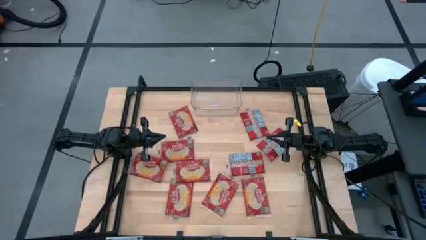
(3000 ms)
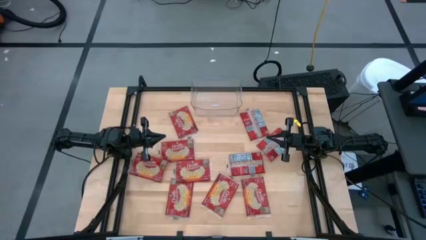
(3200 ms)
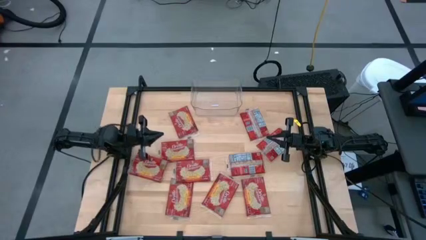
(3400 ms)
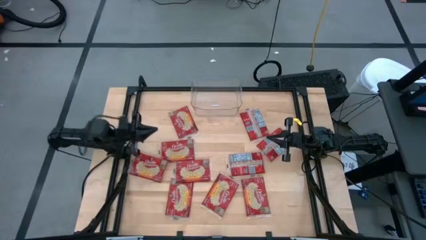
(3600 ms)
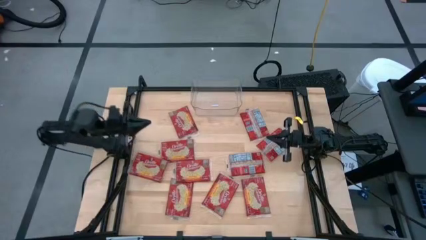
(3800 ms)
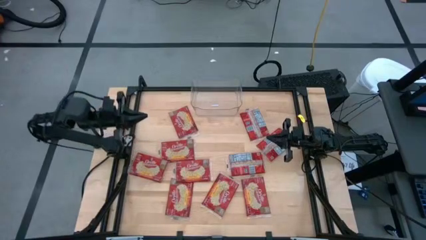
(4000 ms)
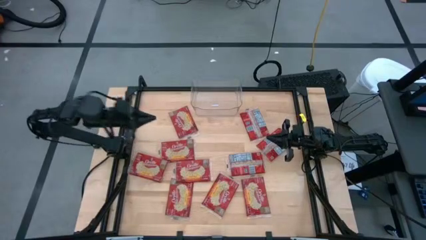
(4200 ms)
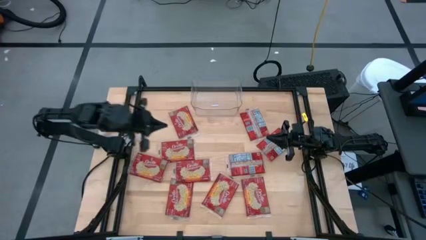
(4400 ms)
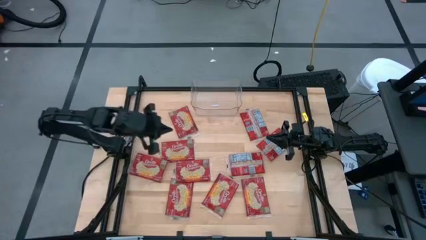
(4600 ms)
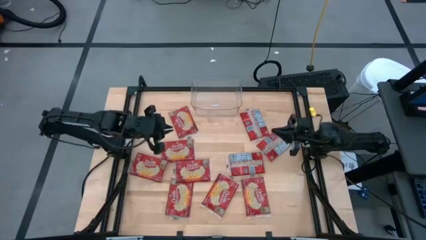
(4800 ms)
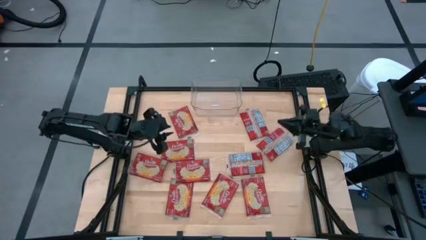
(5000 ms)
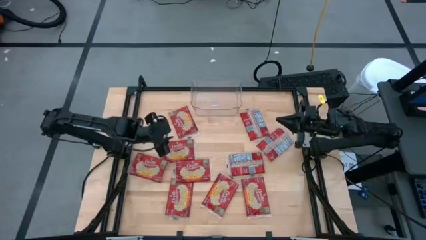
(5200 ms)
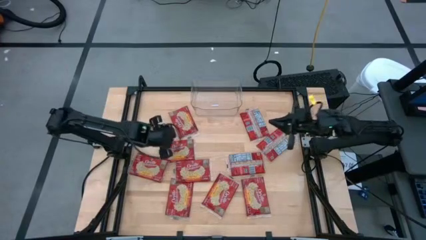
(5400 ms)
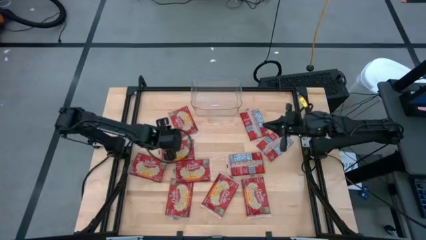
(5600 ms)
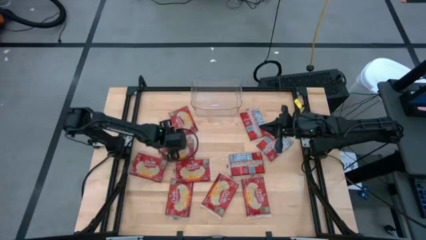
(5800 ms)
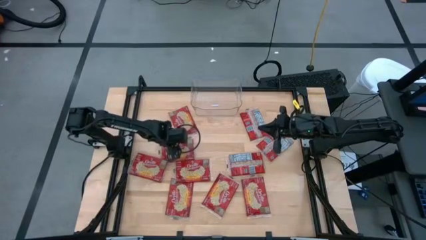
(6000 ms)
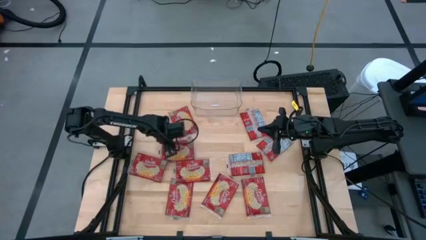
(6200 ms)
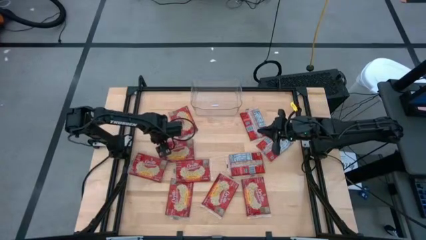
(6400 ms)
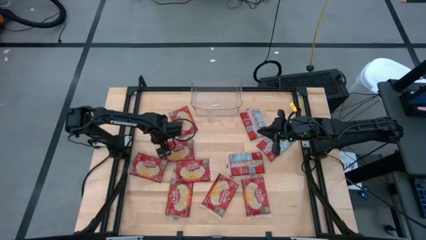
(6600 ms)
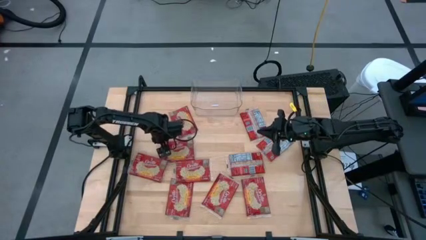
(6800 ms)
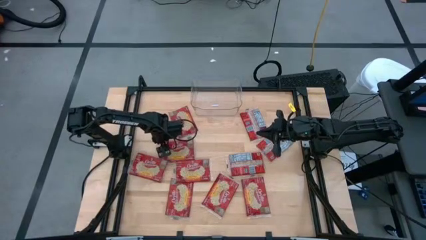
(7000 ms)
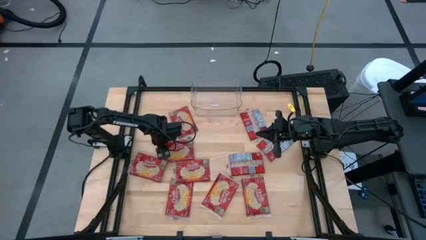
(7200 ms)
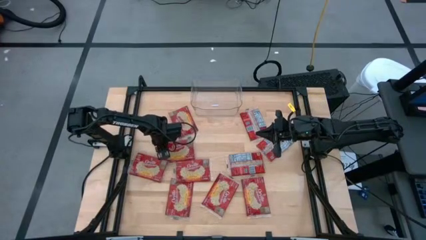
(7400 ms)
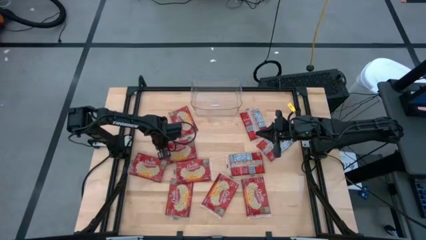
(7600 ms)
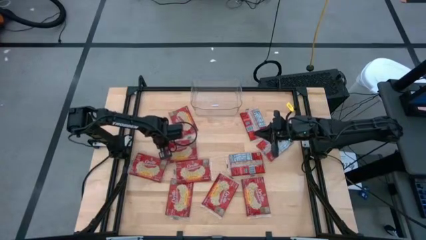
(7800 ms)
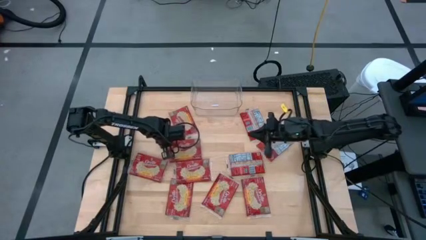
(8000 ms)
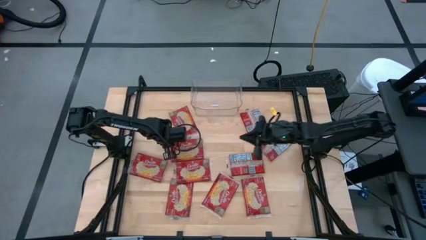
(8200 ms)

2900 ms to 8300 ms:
Task: Sort popcorn bags into baskets
Put the red popcorn bag into the transparent bin

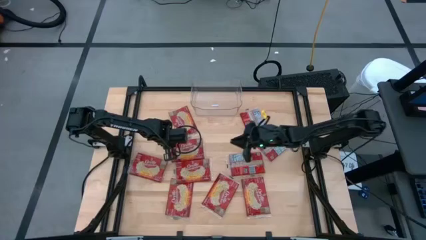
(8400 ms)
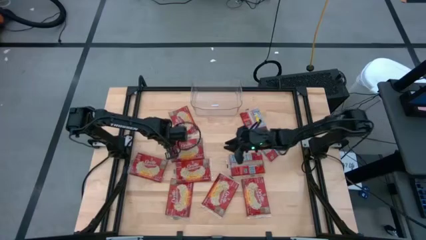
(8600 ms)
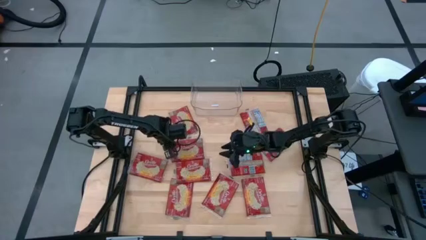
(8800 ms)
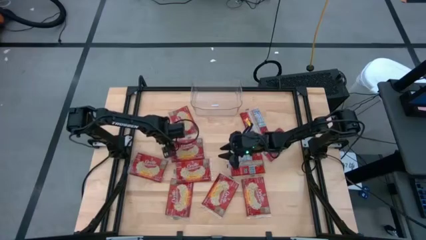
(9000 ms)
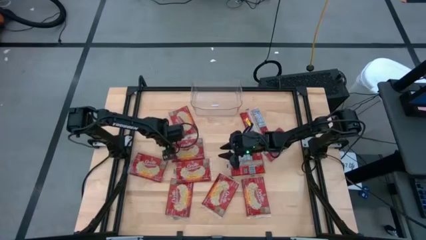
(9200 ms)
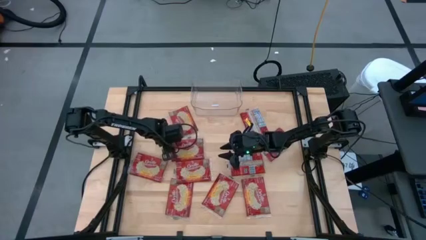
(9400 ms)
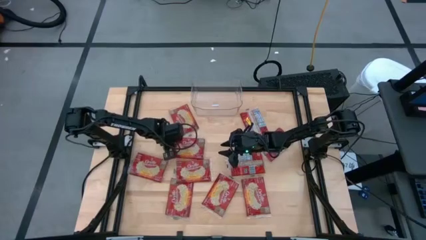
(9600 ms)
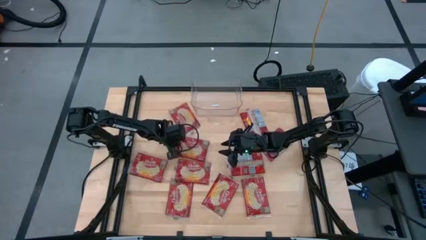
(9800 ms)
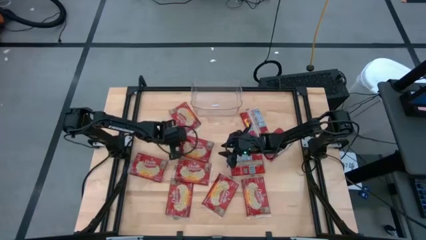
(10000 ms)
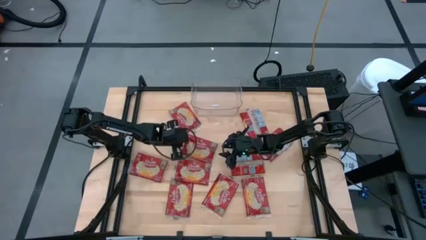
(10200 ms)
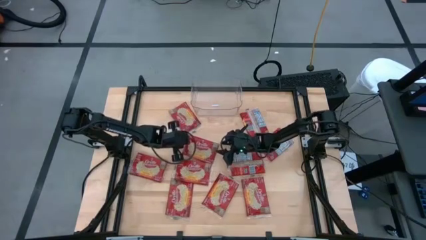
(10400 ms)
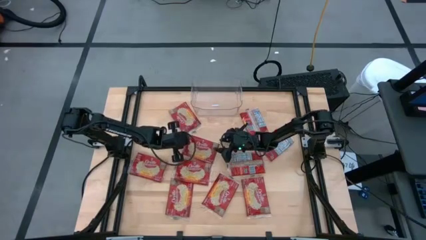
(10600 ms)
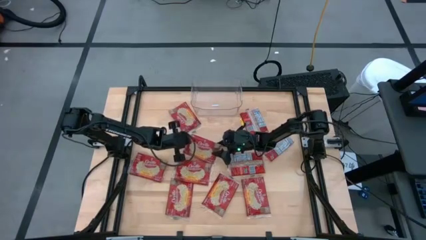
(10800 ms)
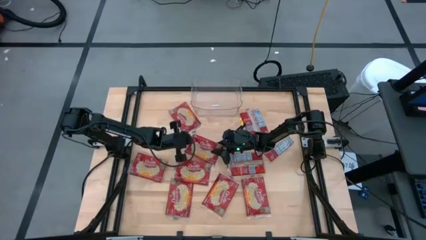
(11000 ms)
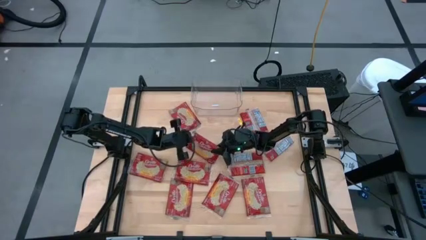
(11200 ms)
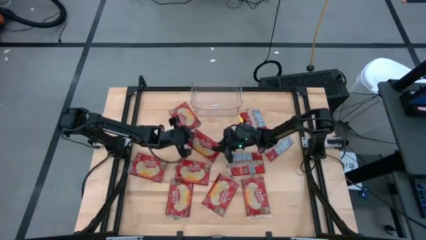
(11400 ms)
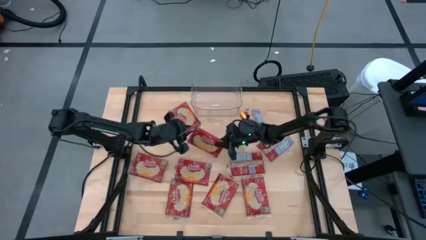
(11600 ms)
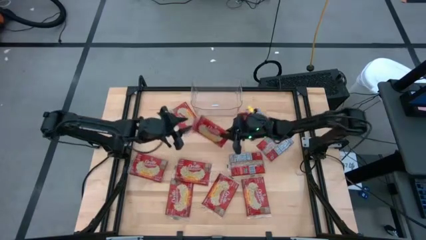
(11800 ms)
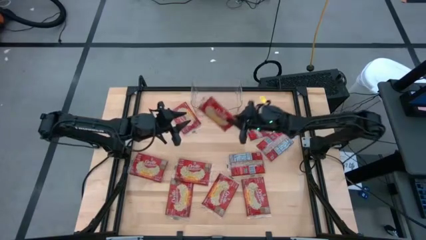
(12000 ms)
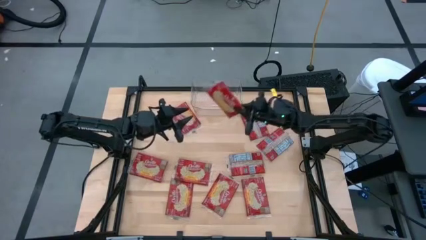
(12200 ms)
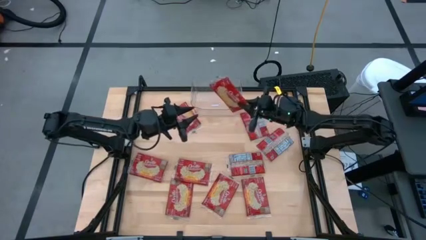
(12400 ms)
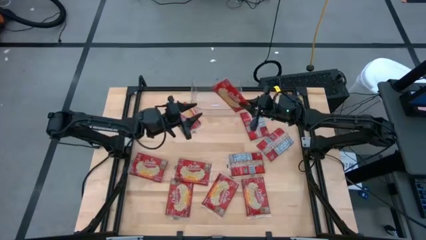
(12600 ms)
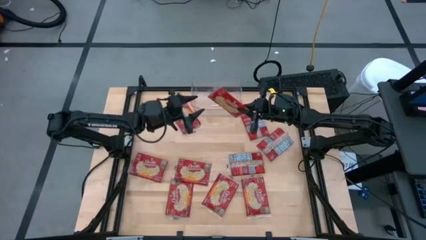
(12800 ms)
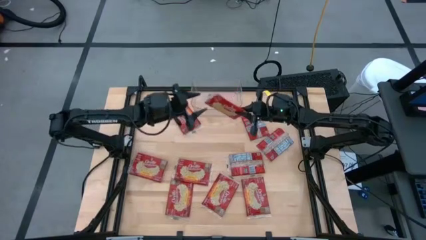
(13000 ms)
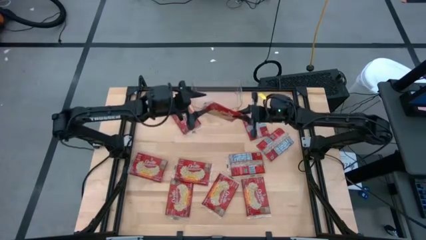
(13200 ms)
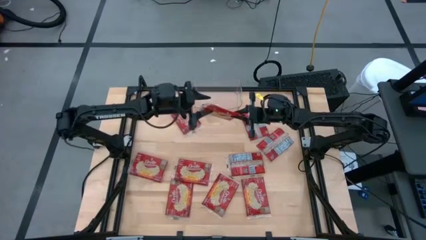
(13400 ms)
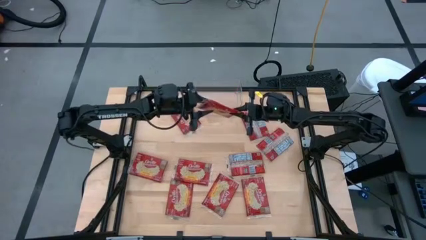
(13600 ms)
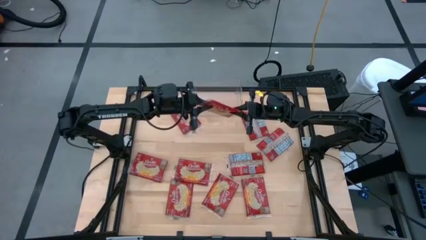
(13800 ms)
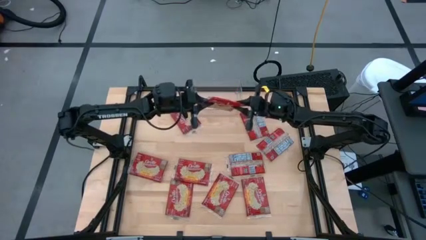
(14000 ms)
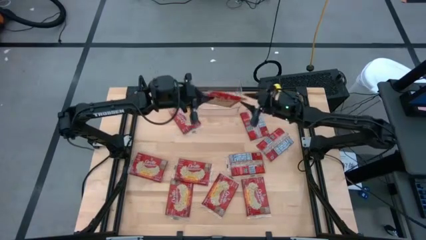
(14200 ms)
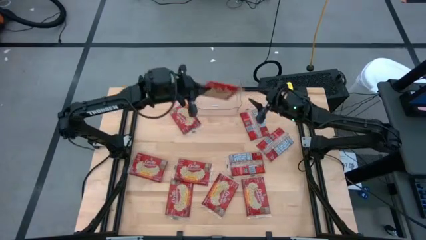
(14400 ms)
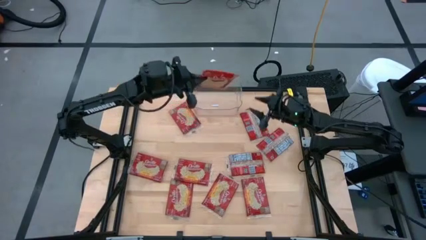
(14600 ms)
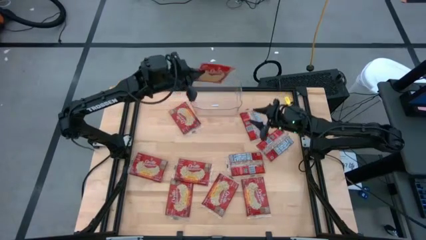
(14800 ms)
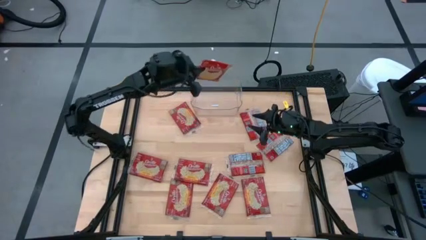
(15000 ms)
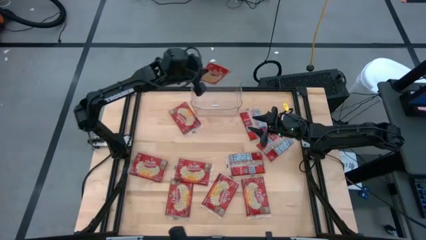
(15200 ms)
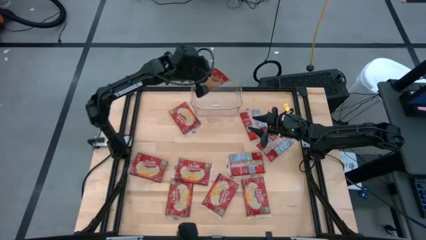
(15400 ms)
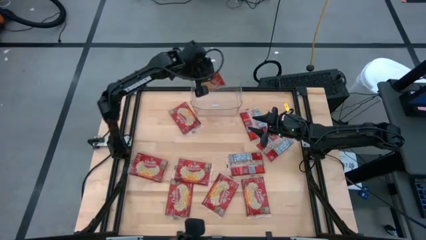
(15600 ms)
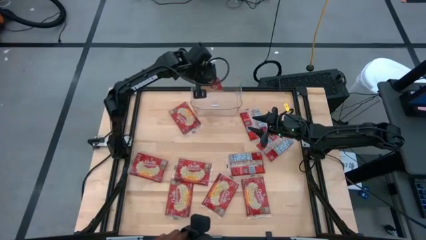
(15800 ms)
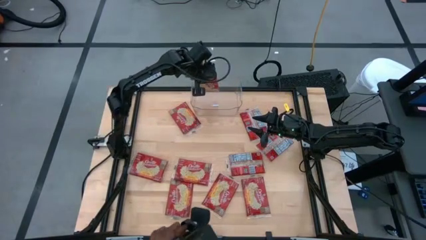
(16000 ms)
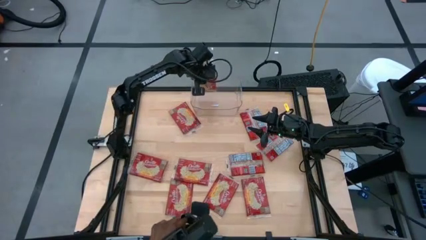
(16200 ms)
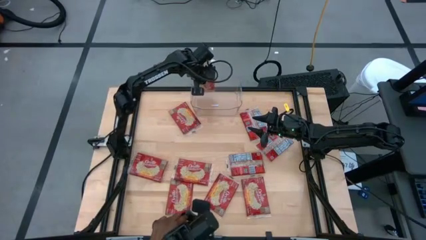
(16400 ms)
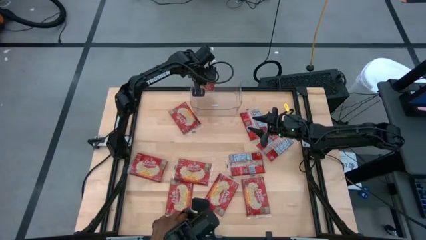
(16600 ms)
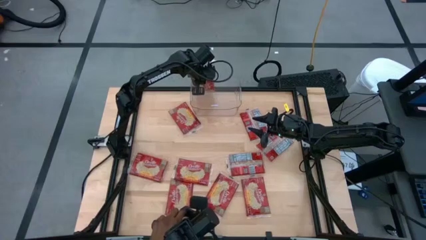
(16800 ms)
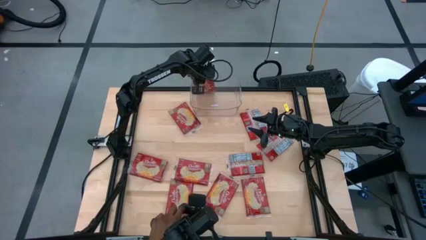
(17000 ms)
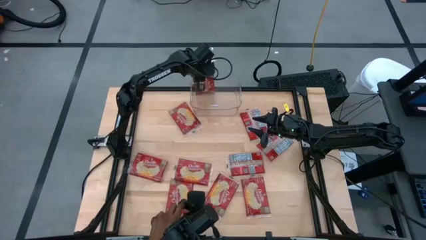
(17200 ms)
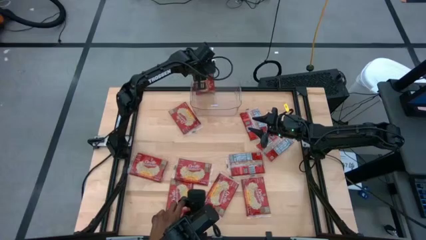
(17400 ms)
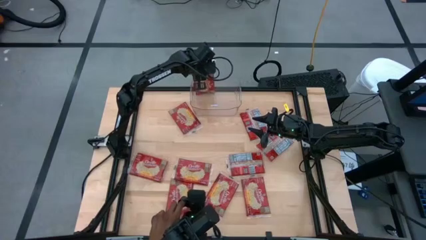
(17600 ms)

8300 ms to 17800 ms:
Put the red popcorn bag into the transparent bin

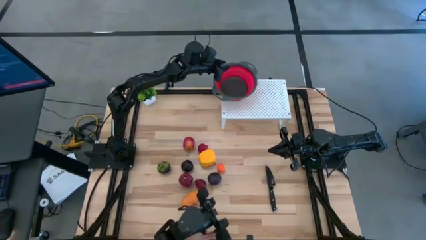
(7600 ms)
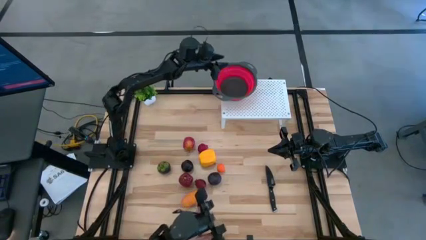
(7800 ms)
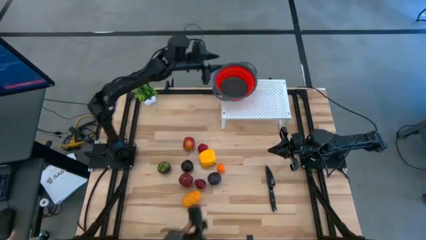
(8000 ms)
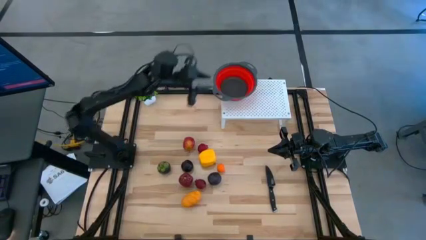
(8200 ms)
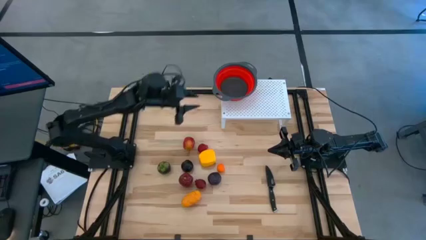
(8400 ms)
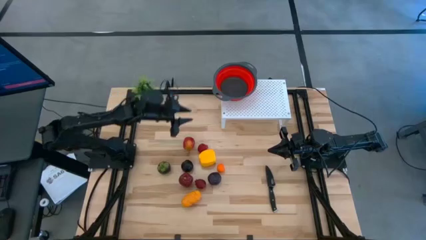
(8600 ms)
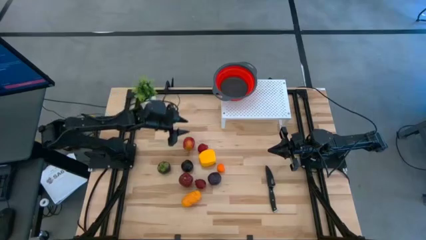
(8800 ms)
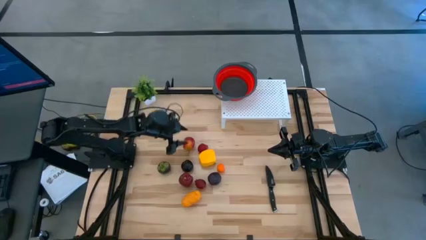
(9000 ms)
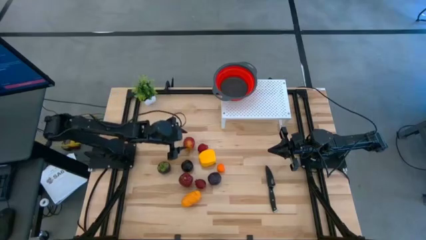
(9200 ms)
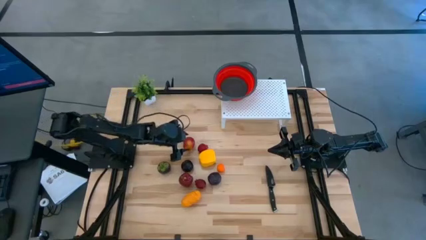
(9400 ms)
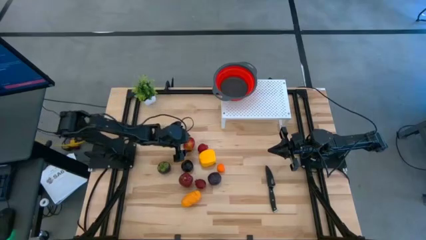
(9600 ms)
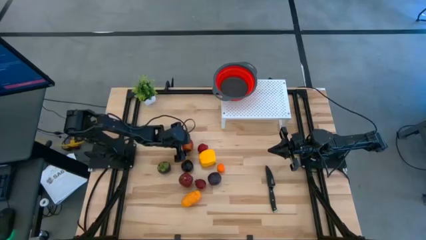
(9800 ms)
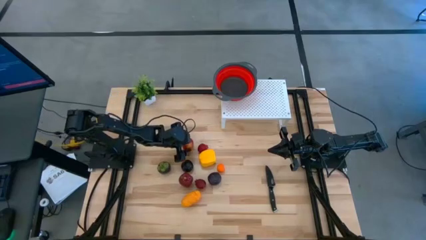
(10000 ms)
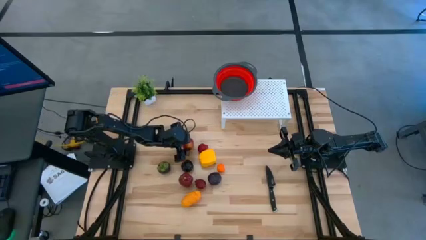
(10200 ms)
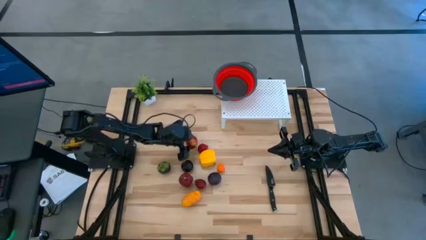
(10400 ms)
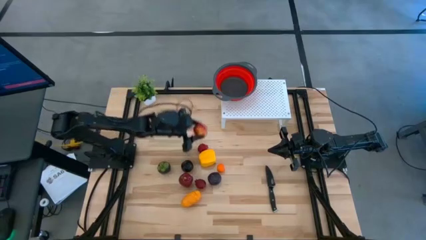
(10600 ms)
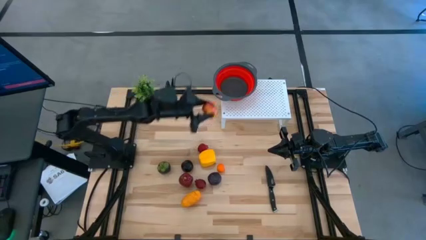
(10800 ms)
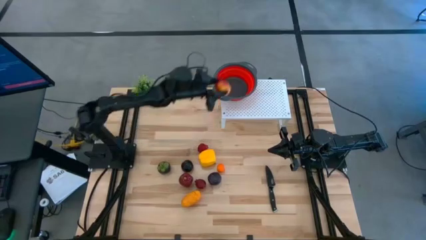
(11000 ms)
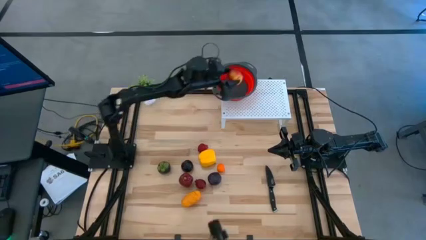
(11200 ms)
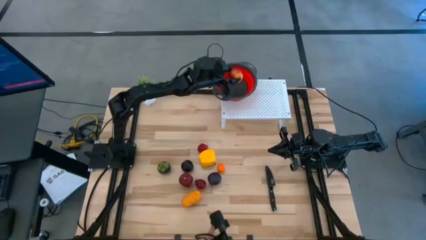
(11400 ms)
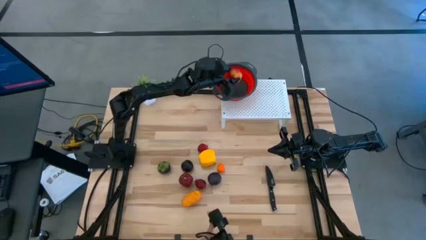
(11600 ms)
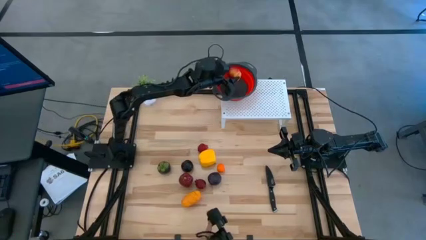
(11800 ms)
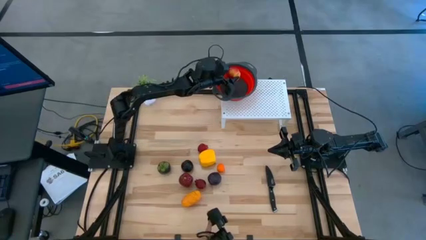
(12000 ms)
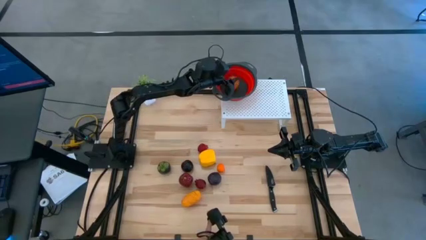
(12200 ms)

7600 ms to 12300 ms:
Task: Pick & Place Fruit
Put the apple into the red strainer bowl
